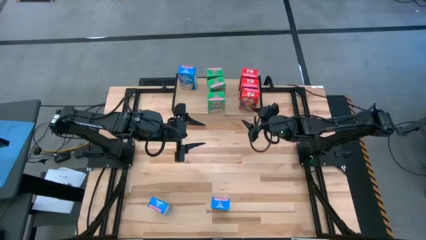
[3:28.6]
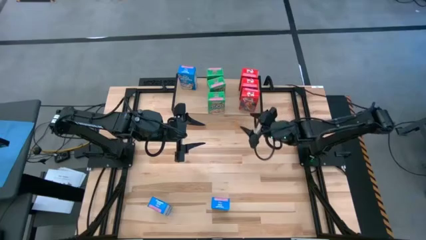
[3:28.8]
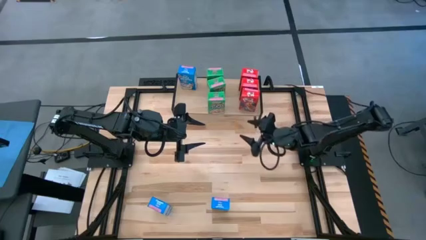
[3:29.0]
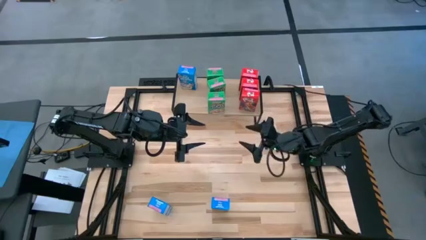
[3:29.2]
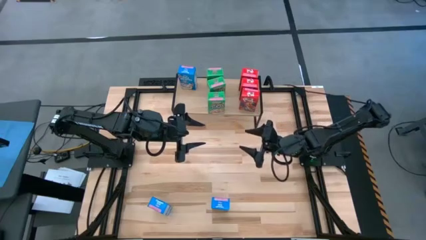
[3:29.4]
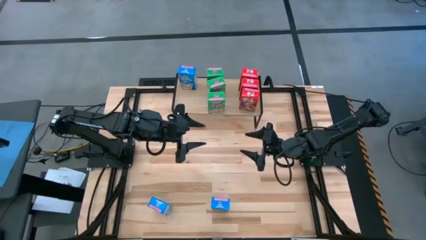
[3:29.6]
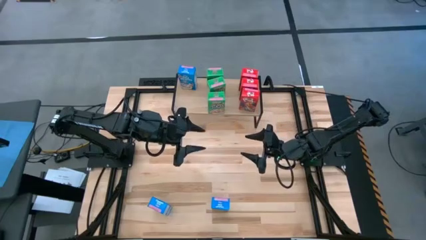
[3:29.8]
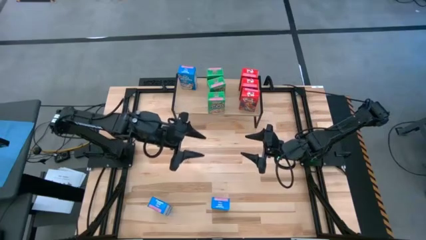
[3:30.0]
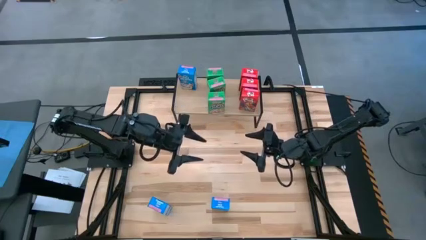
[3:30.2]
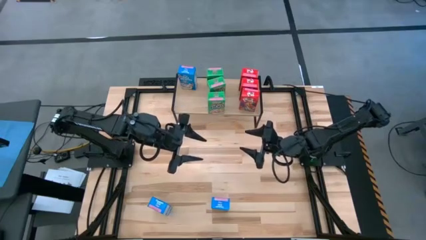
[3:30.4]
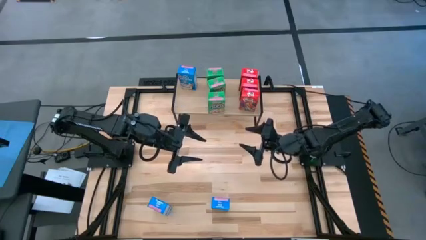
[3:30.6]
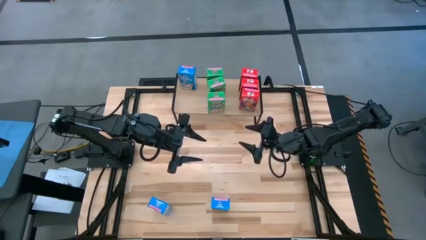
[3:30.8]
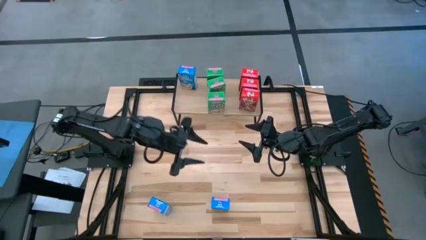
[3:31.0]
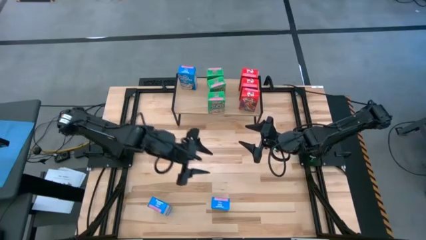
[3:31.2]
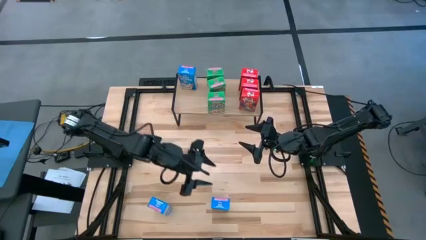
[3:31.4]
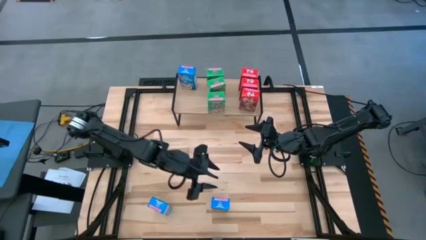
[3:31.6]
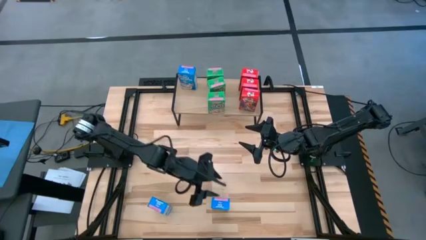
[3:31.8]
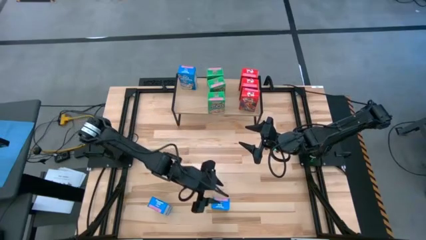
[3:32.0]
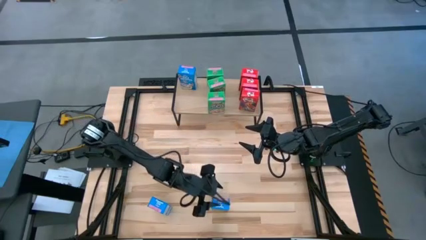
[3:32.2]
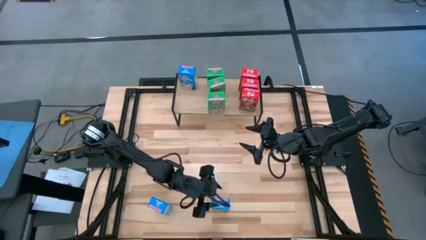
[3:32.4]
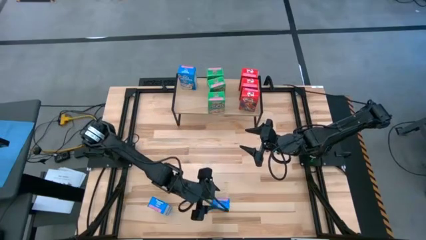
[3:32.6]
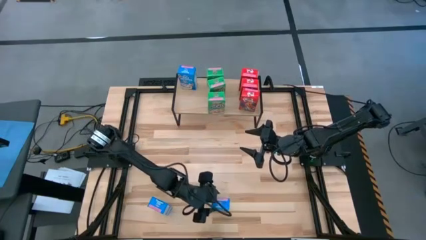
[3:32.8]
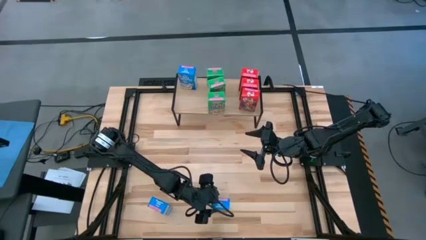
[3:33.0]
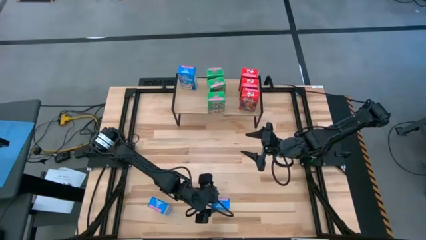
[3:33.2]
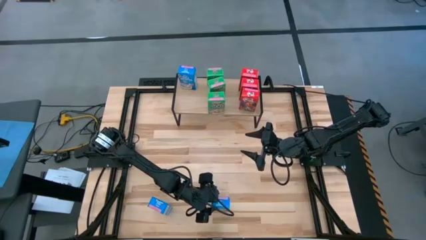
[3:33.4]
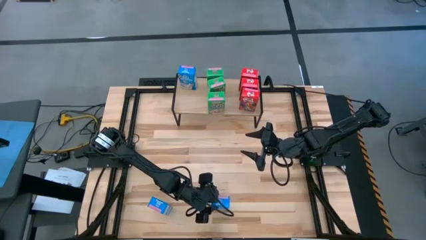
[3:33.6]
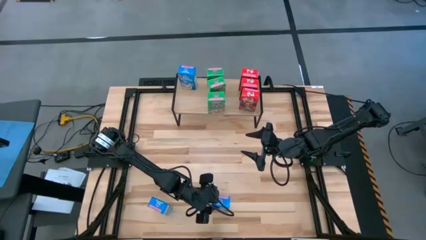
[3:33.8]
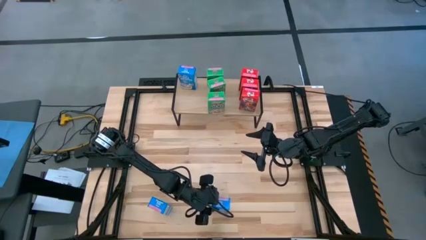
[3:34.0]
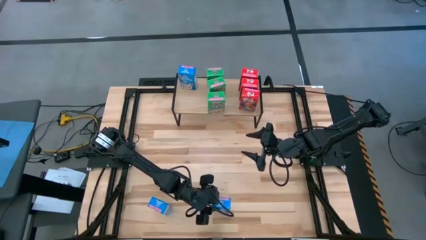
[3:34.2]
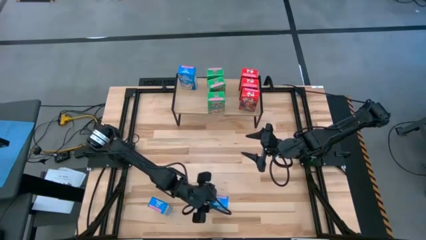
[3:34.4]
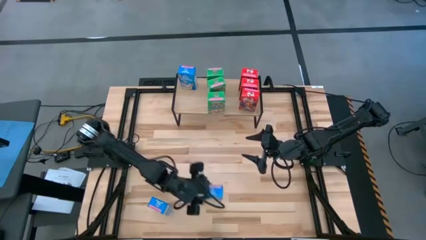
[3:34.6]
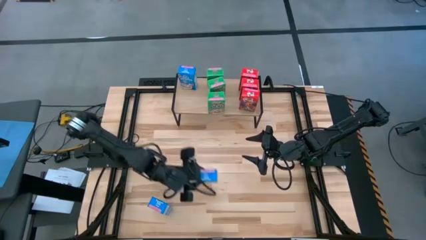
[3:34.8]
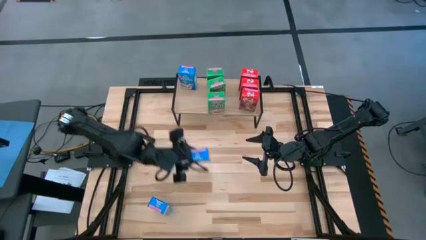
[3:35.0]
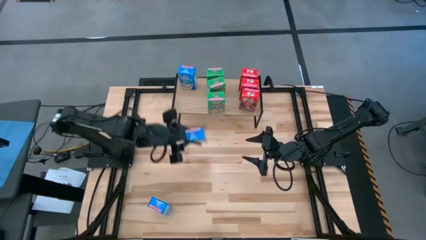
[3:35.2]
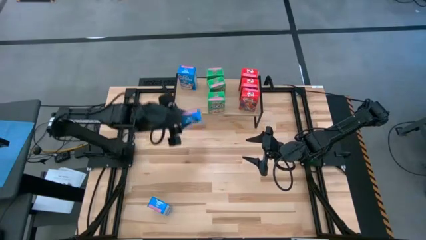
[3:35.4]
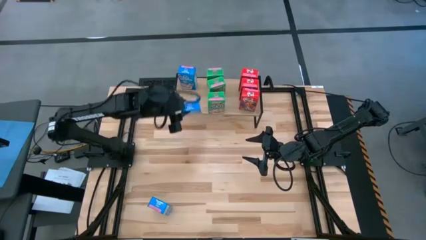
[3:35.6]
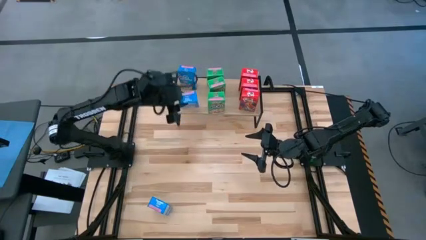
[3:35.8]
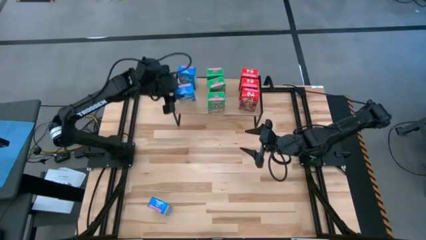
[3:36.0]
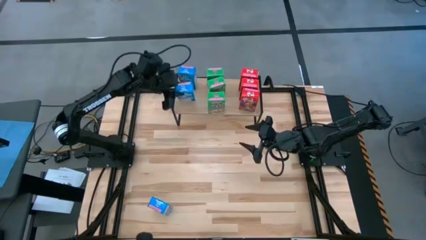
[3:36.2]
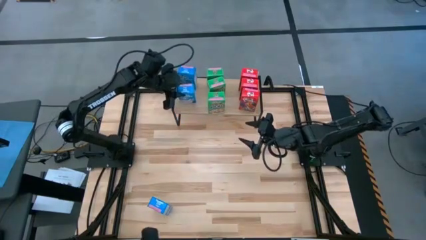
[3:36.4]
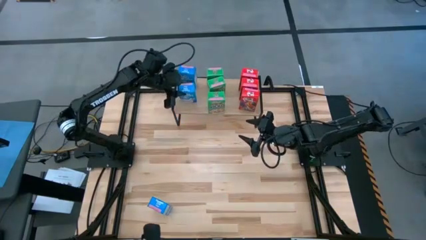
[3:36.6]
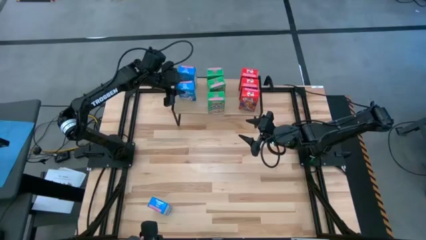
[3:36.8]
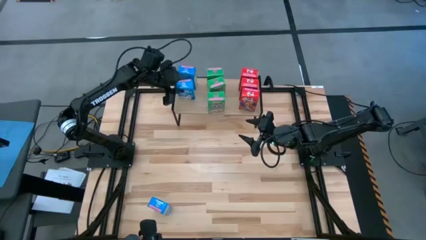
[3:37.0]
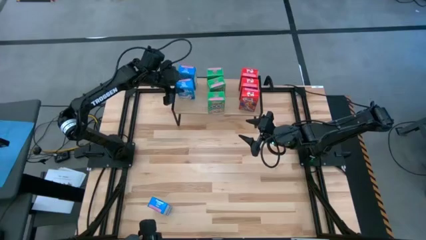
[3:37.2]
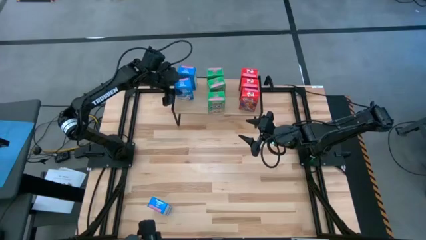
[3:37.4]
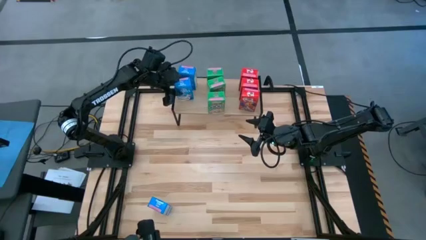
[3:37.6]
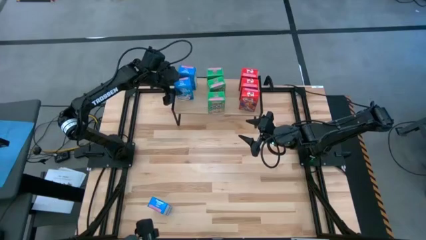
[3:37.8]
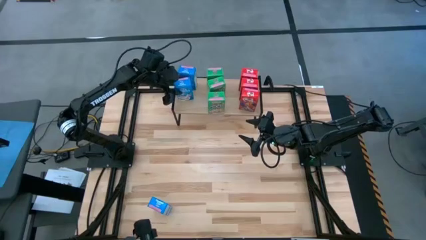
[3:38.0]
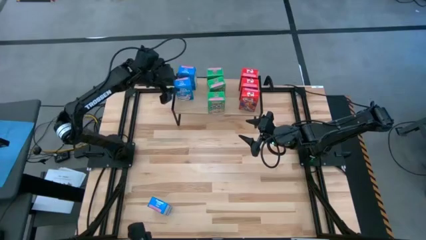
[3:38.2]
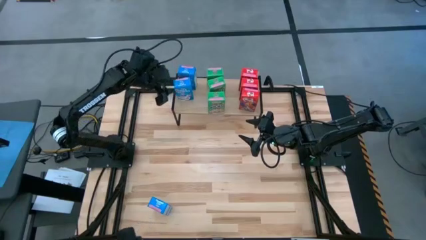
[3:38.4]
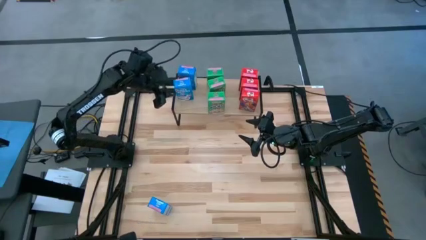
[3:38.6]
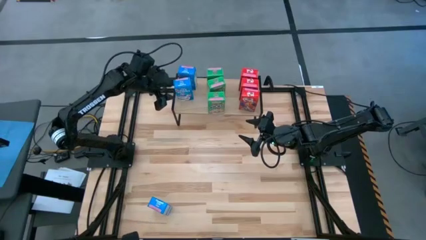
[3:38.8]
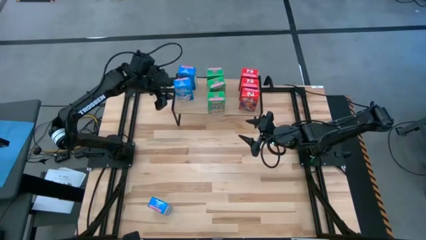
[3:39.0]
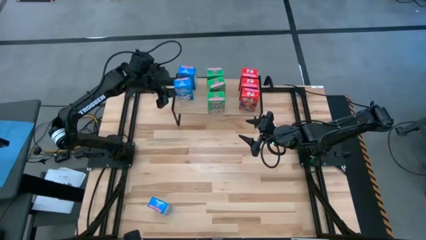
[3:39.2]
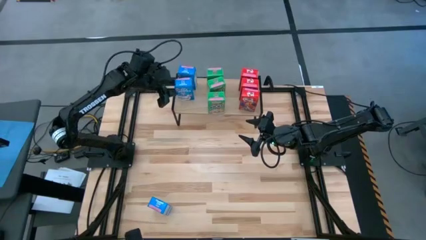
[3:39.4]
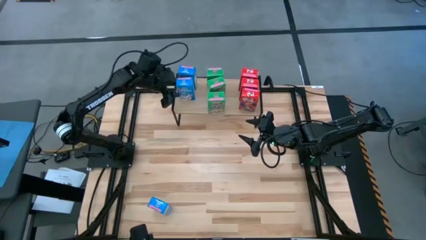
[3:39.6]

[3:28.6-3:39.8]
Task: Stack cereal on shelf
Put the right blue cereal box on the shelf aligned with the blue cereal box

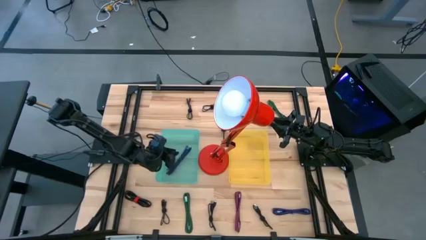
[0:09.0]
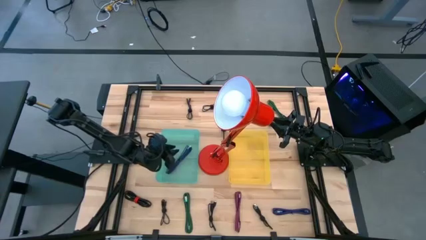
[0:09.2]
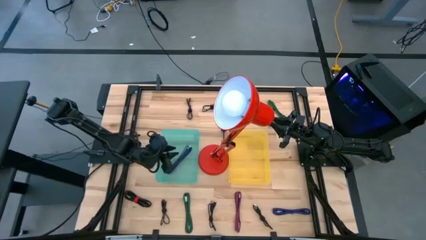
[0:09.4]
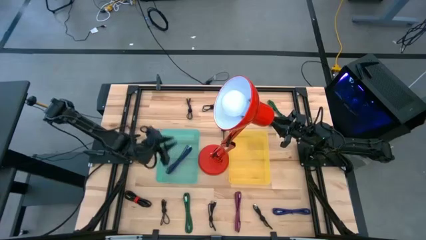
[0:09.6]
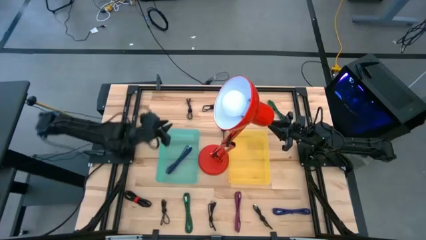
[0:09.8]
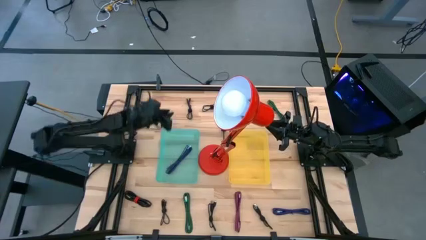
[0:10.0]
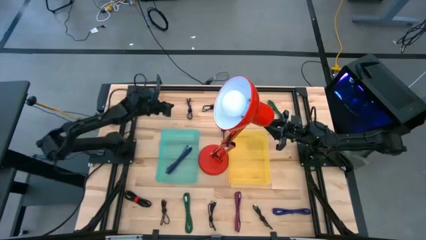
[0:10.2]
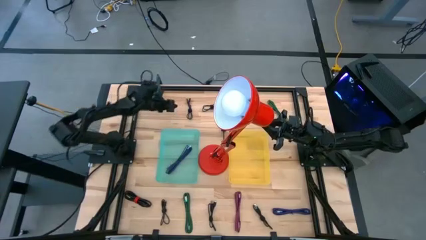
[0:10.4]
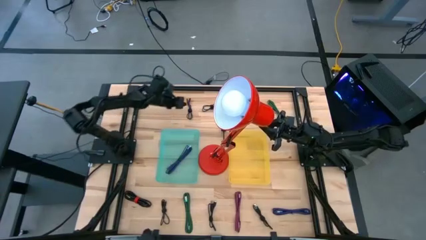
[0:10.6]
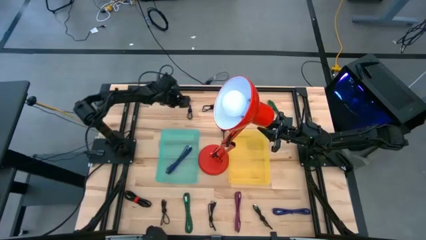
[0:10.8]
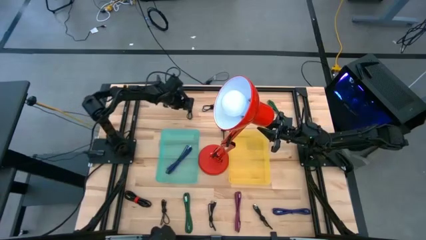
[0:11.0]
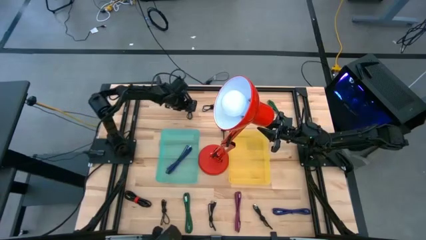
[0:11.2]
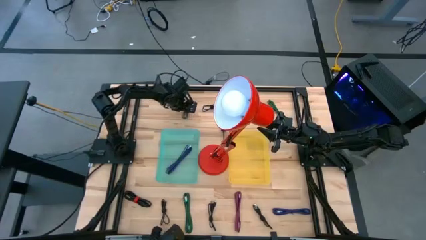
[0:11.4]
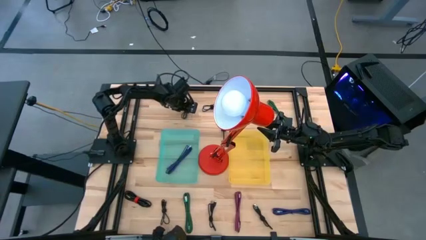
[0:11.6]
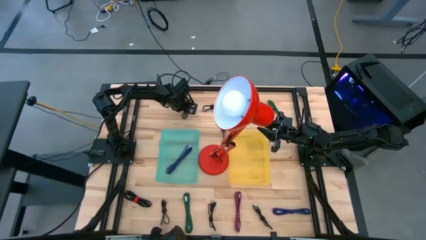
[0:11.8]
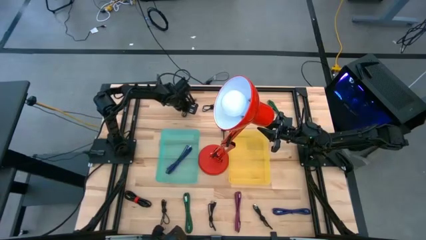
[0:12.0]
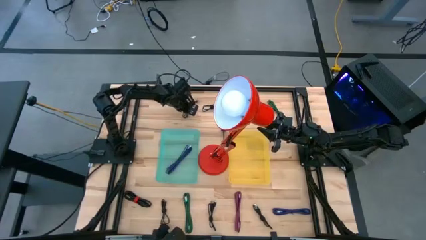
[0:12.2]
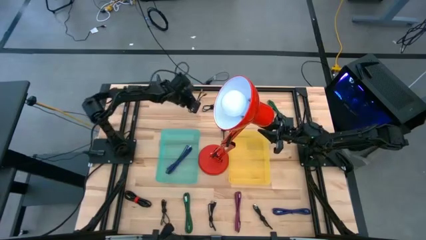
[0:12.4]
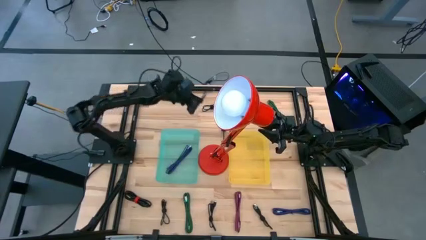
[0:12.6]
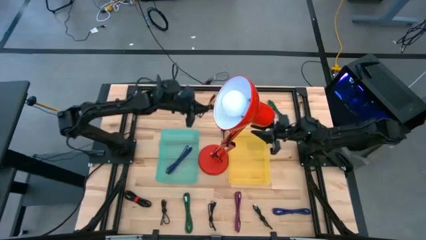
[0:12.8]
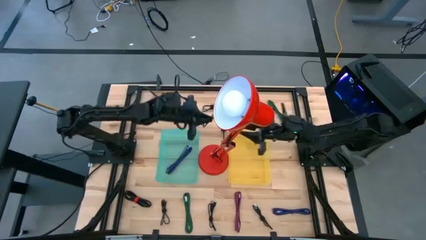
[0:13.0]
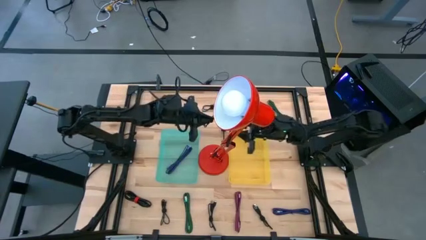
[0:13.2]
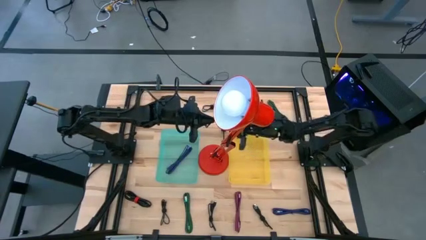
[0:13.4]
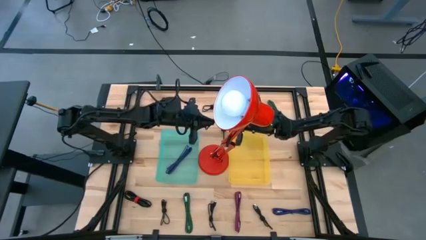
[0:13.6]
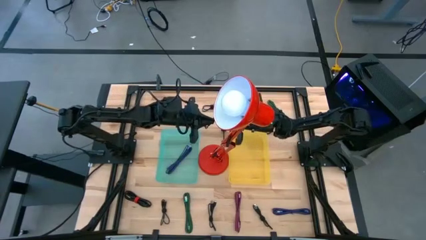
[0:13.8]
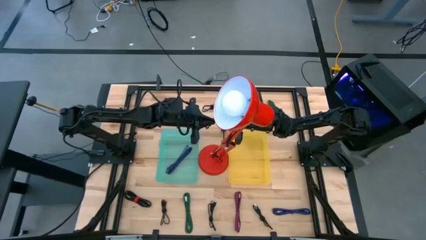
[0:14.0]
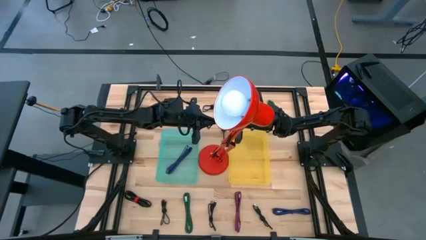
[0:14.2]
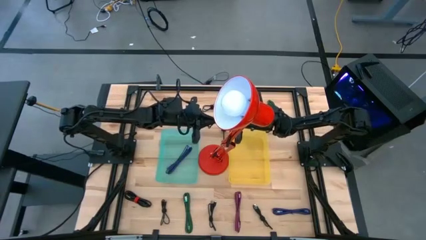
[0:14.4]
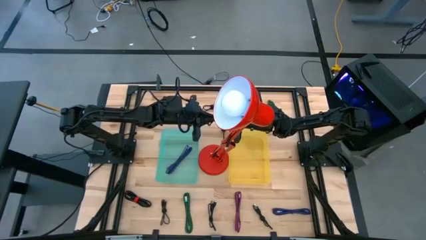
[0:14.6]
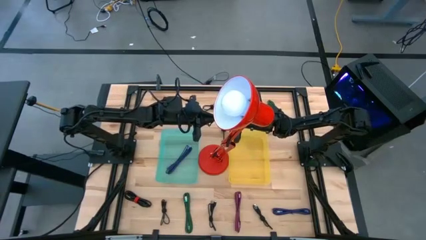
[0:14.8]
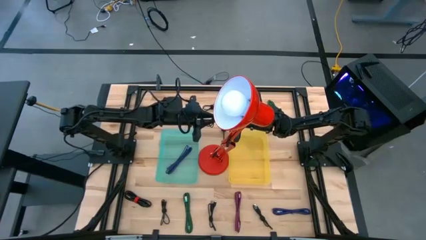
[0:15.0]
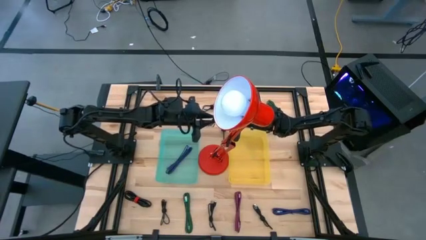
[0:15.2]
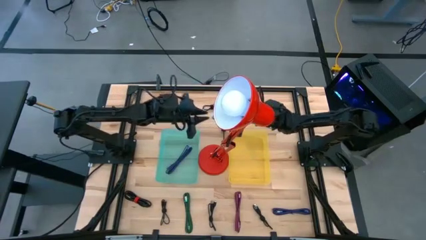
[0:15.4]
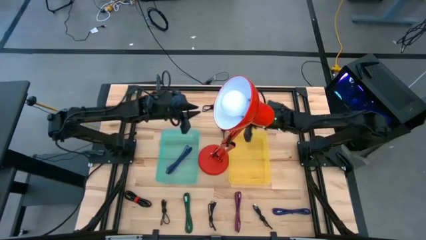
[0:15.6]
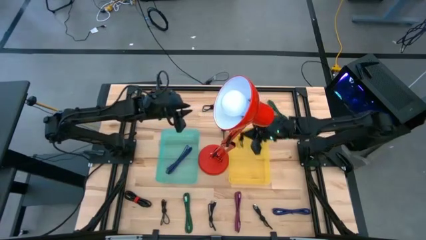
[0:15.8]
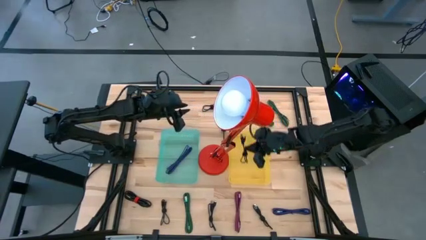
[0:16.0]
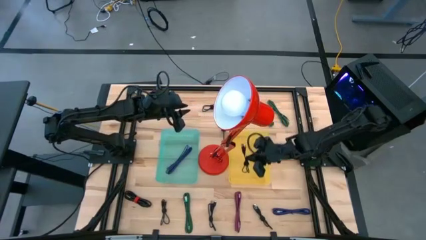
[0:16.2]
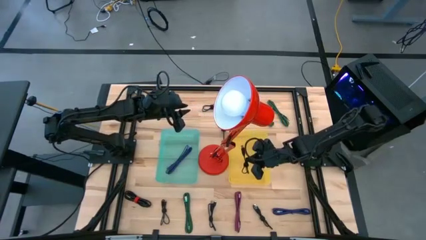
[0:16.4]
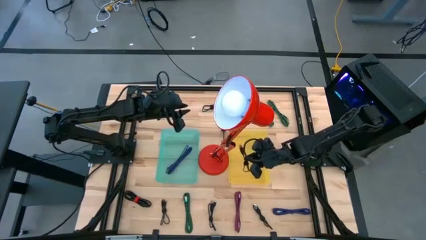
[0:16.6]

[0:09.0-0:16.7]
Task: Pick & Place USB Port
Put the top left power cord into the yellow bin
